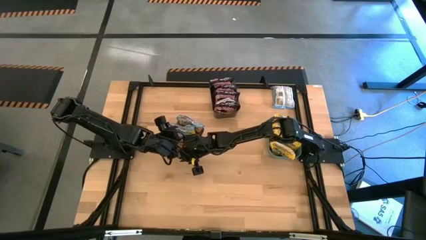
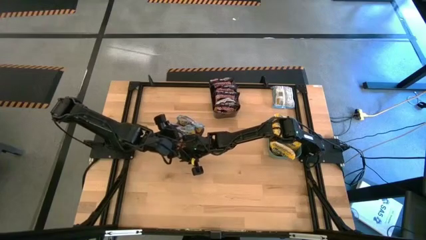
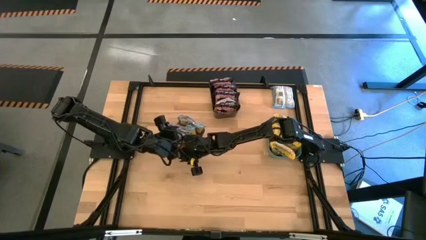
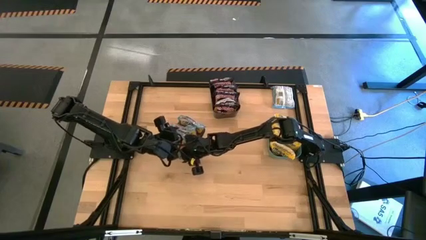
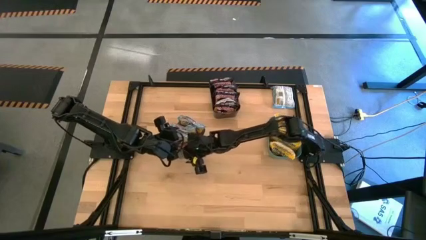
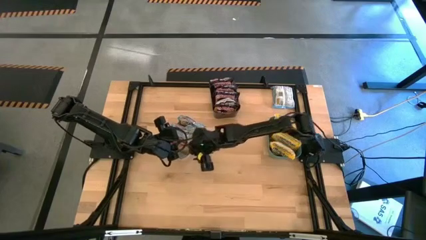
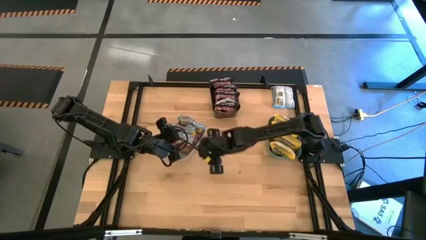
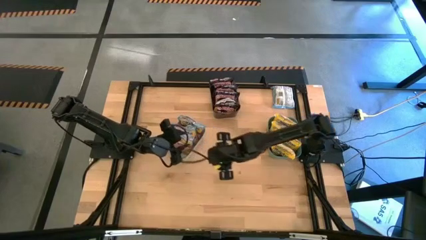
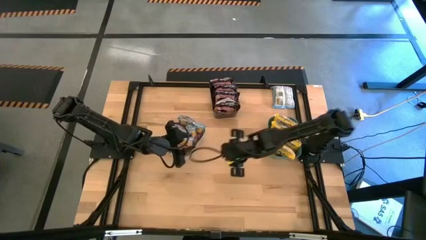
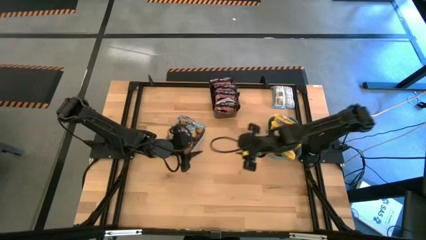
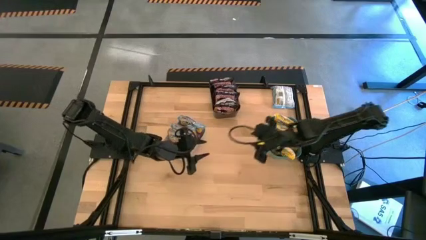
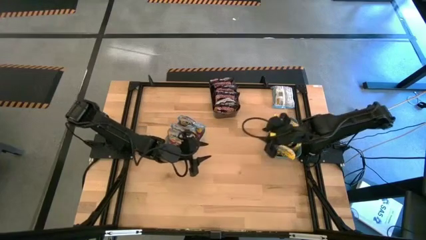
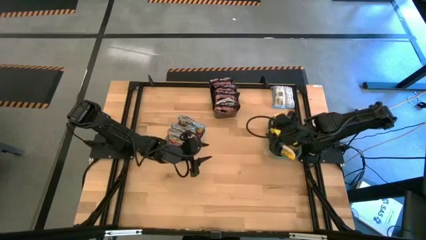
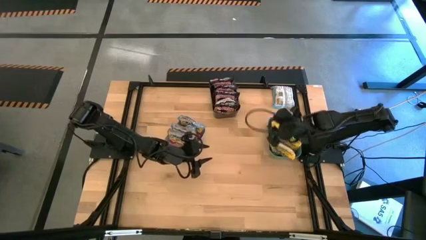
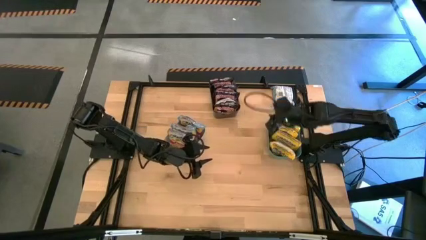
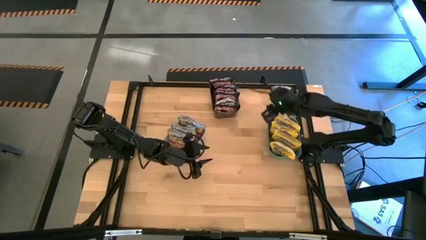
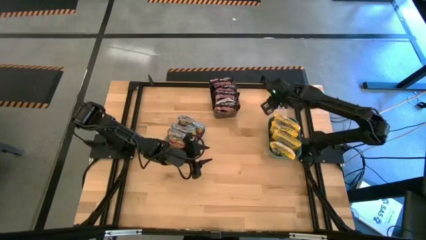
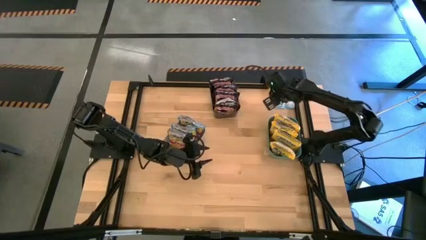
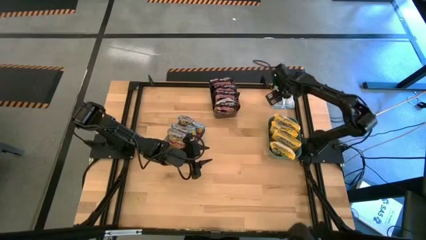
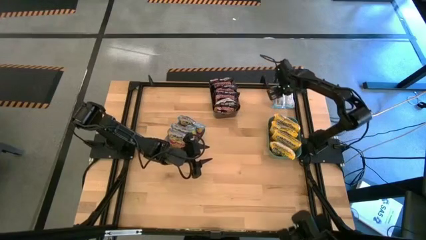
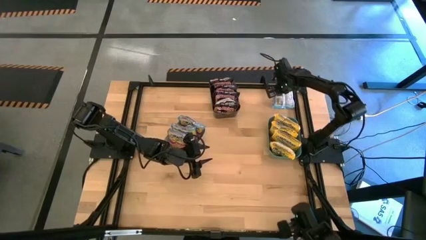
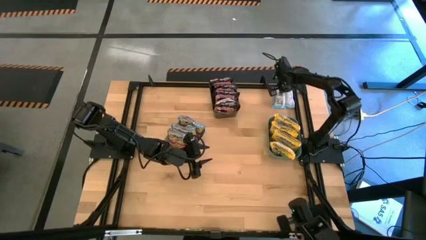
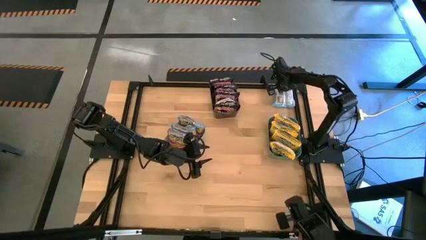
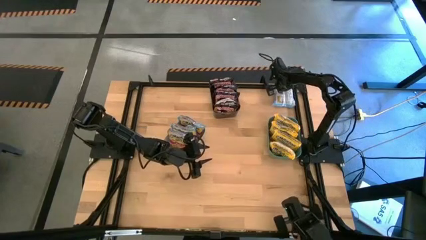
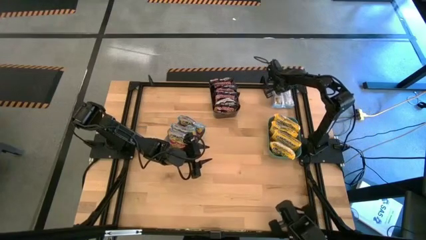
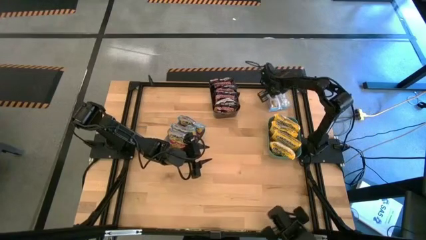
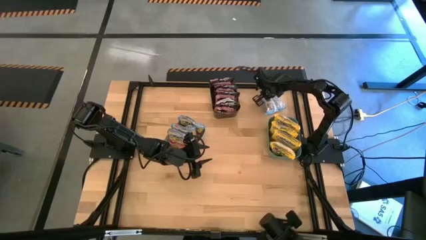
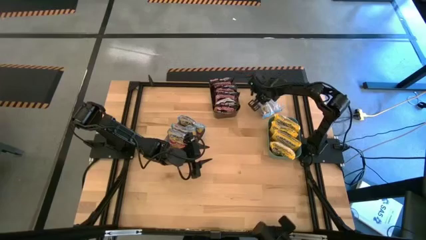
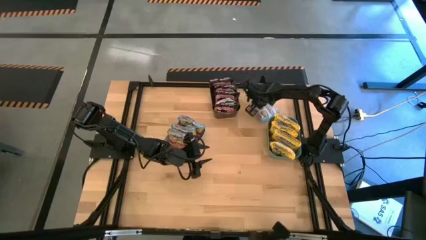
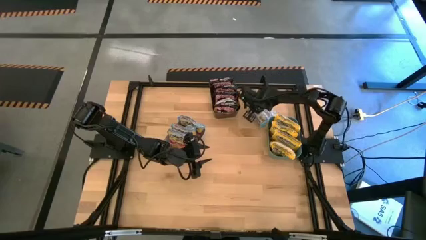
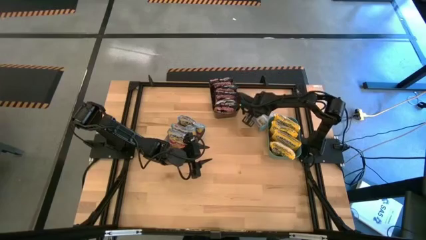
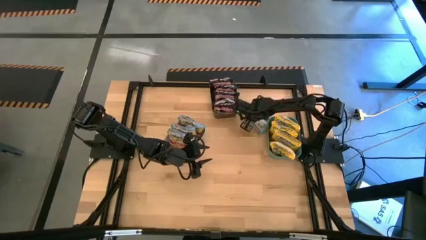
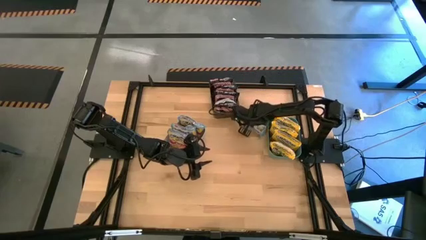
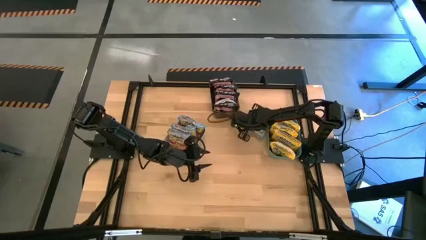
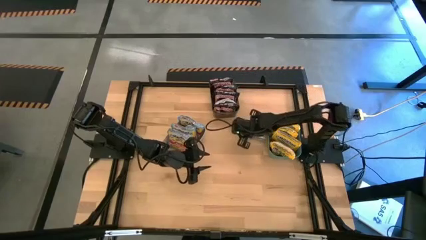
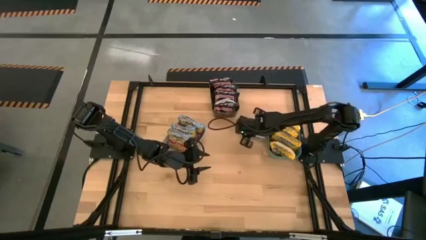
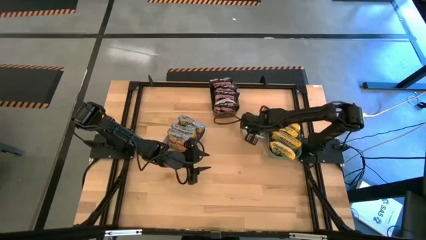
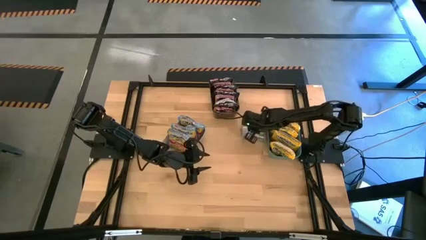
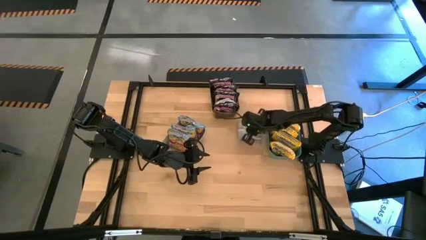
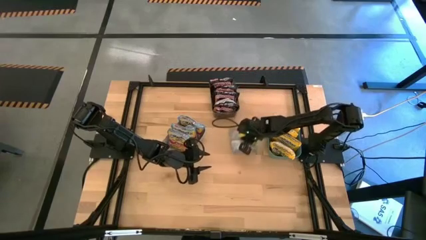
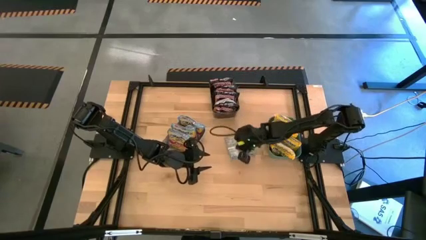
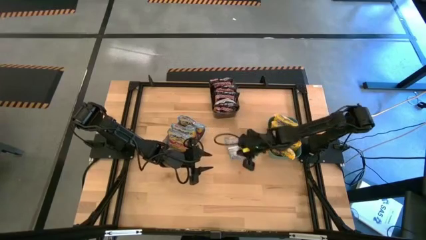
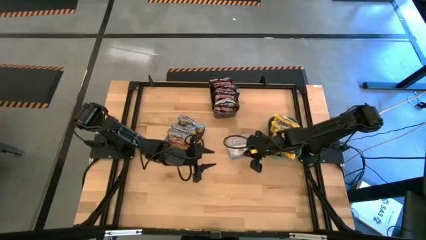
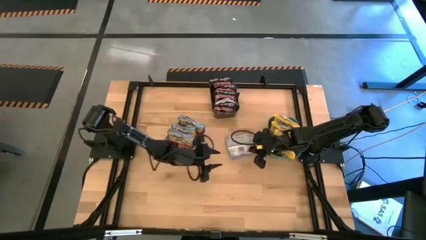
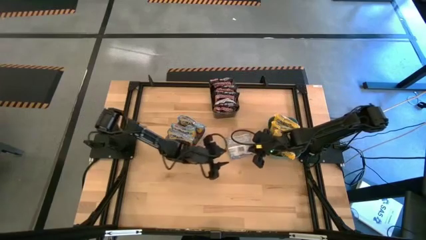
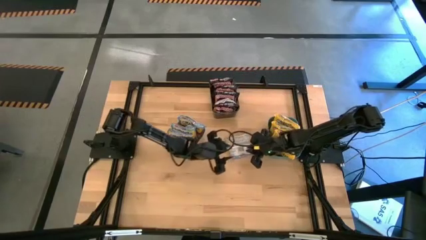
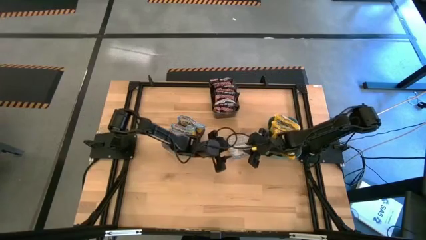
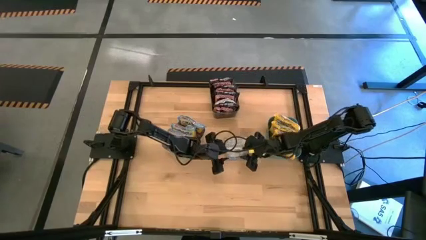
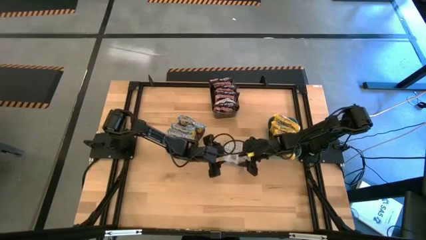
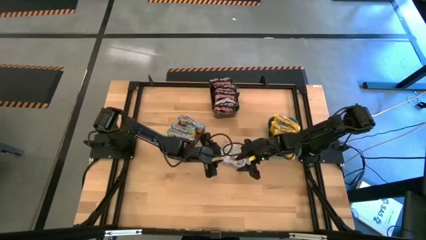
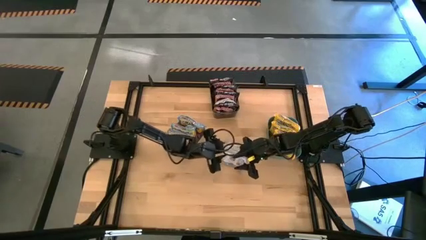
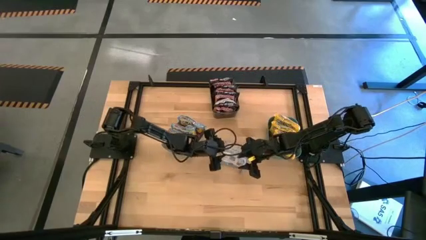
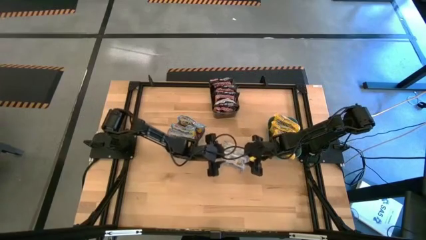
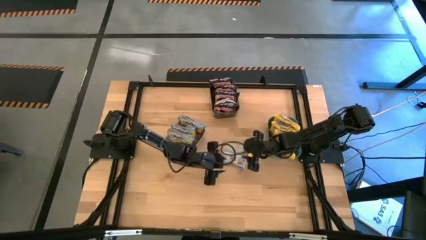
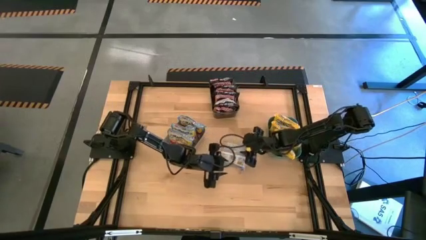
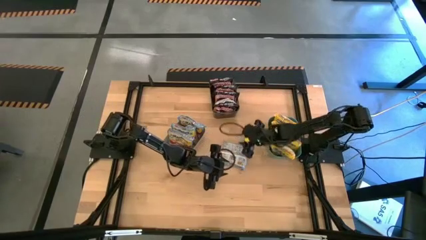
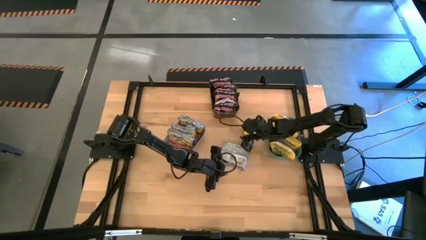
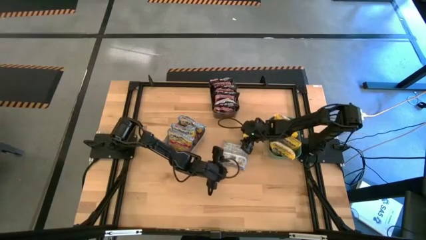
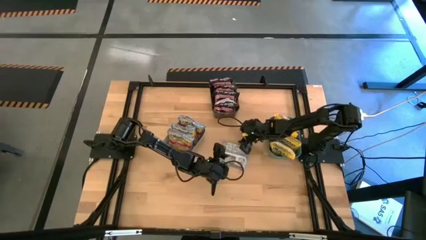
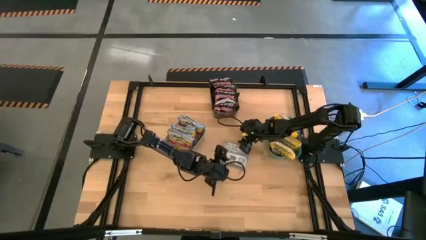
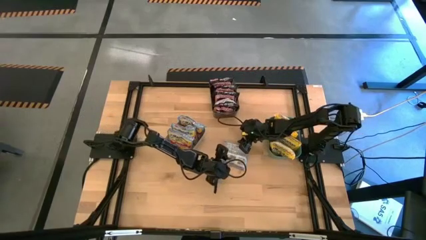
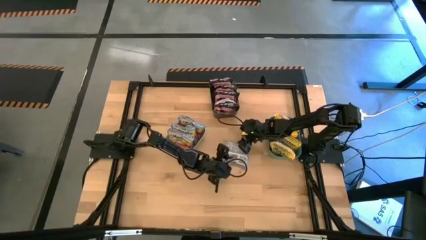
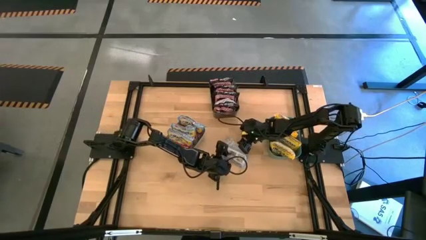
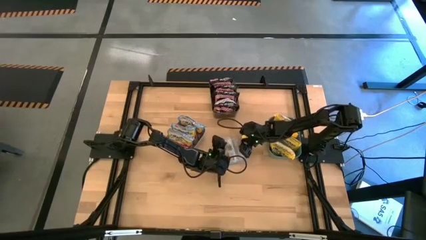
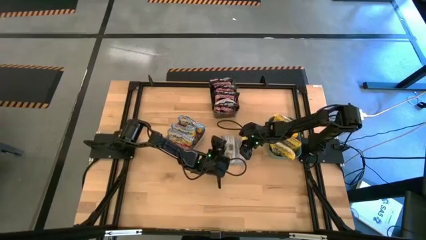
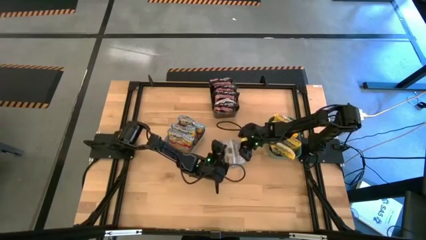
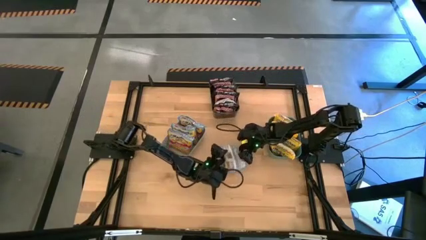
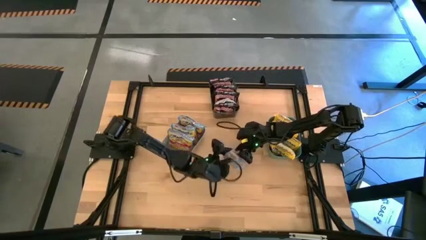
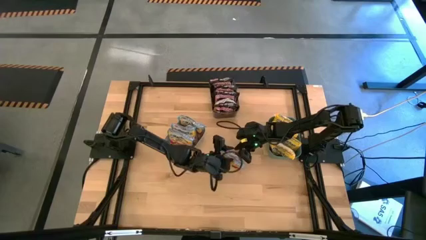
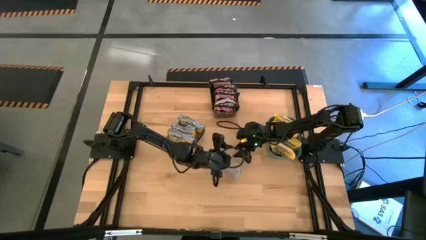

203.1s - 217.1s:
Task: Sort Maruchan noodles
Put the blue noodle pack into the gray bin
